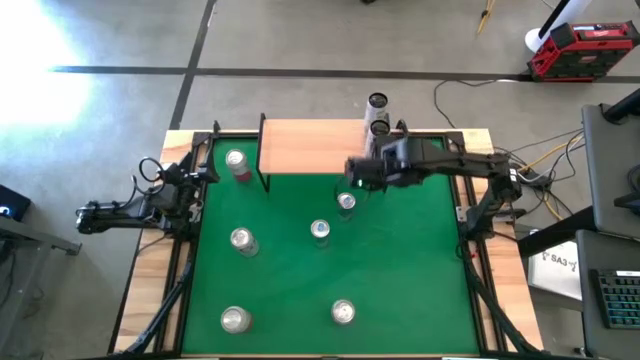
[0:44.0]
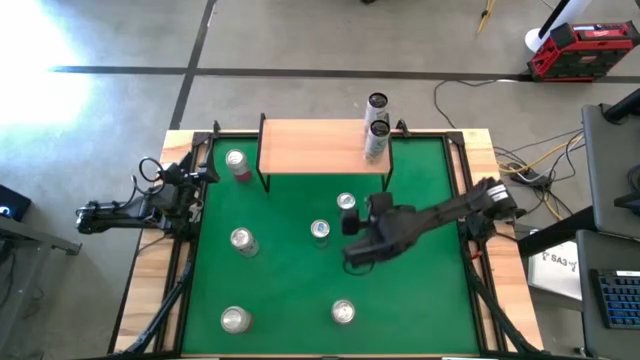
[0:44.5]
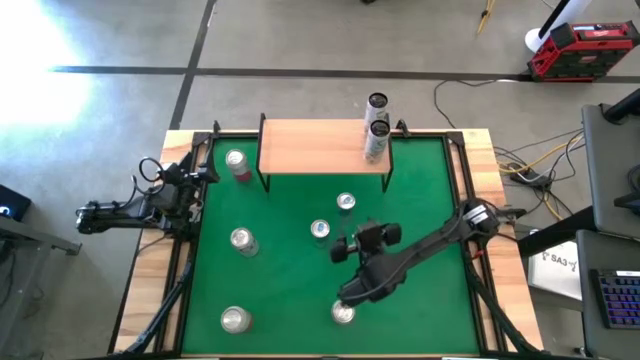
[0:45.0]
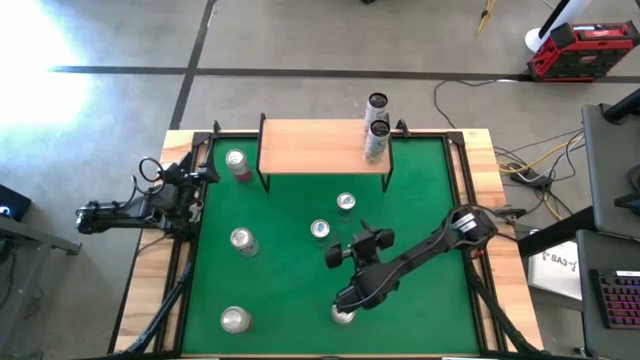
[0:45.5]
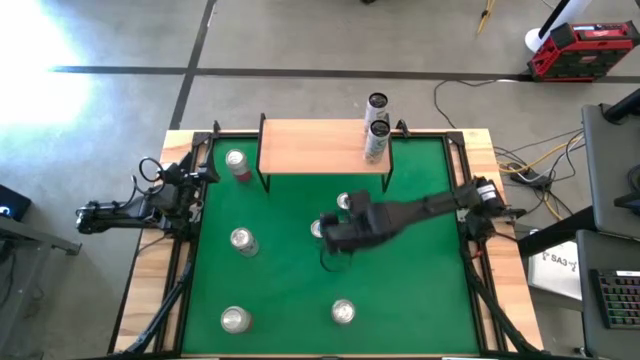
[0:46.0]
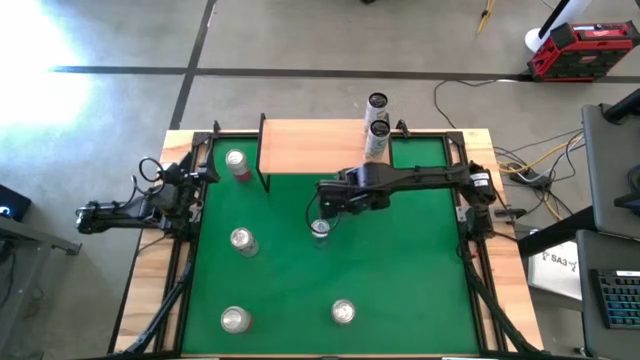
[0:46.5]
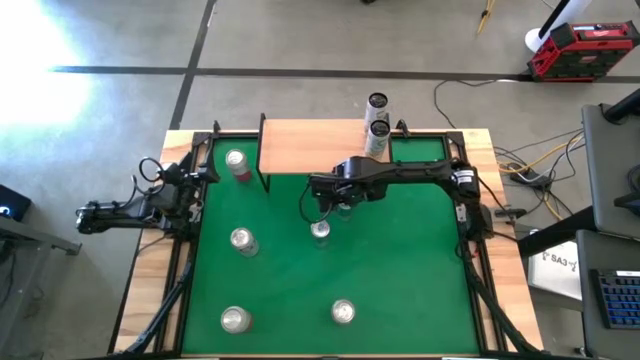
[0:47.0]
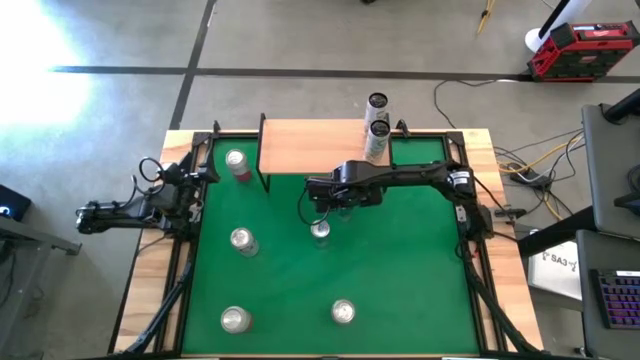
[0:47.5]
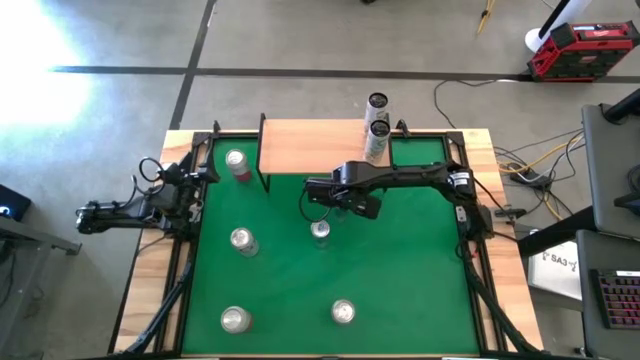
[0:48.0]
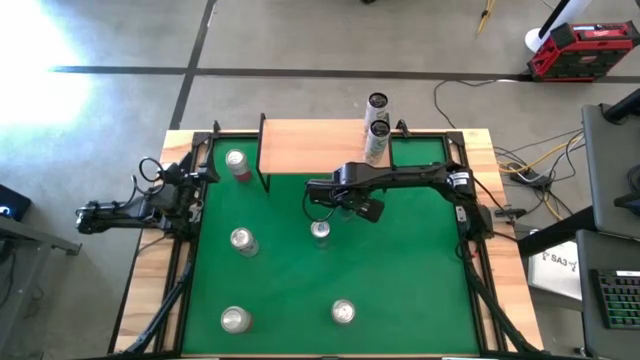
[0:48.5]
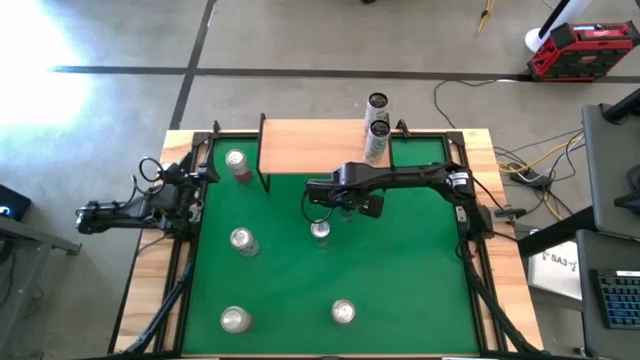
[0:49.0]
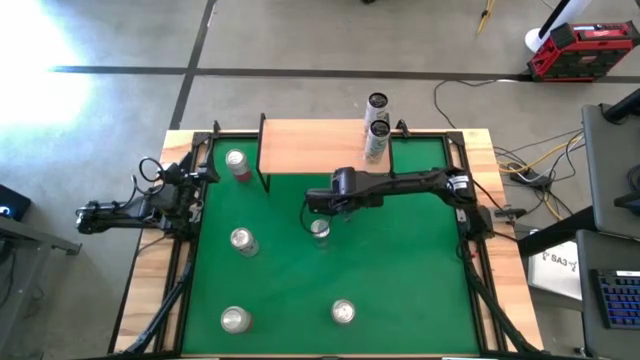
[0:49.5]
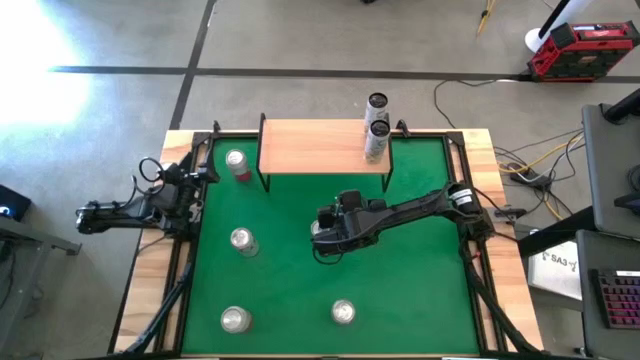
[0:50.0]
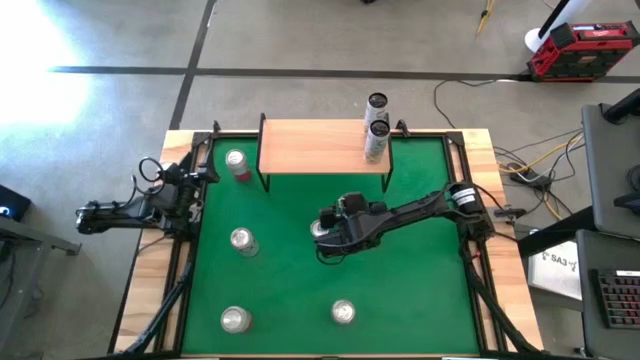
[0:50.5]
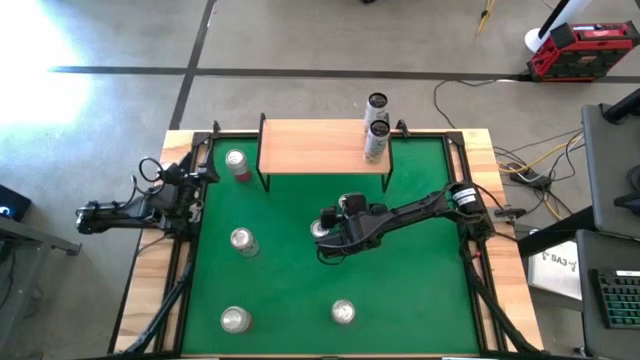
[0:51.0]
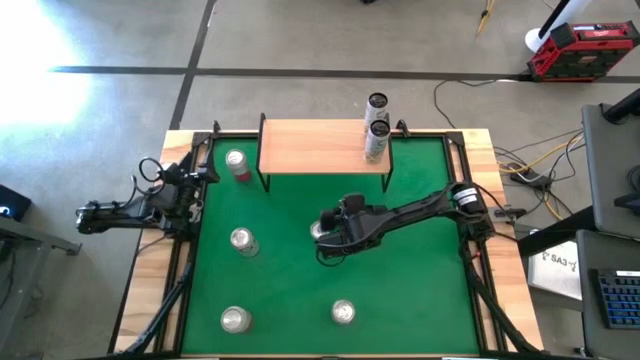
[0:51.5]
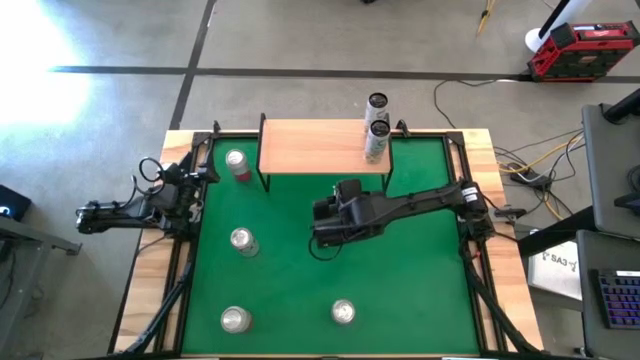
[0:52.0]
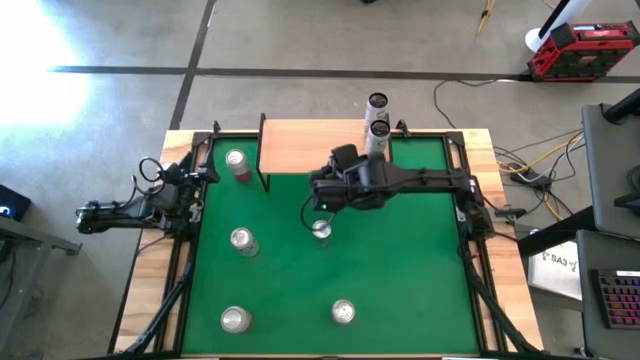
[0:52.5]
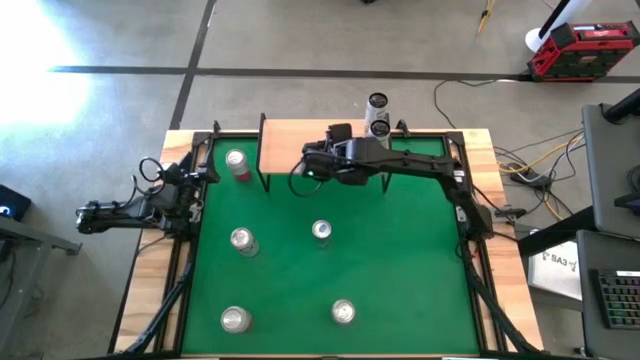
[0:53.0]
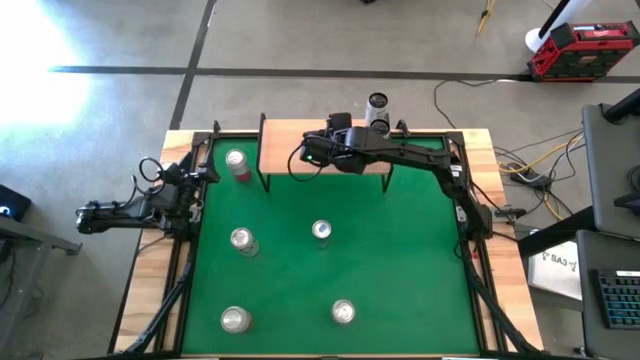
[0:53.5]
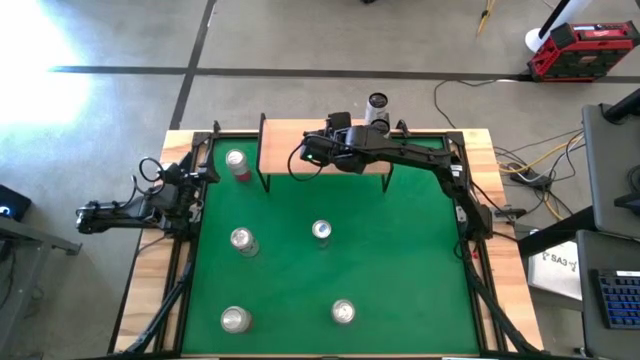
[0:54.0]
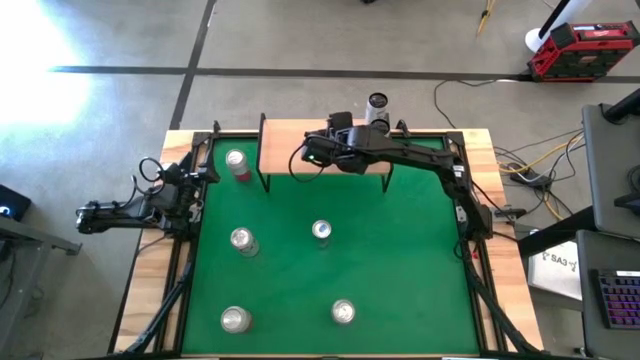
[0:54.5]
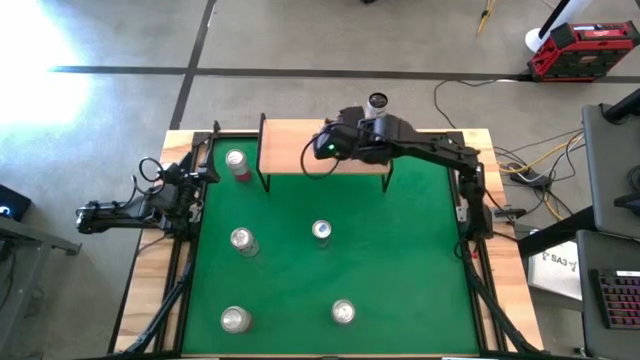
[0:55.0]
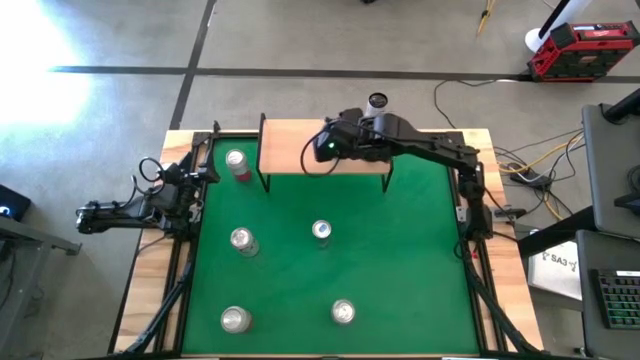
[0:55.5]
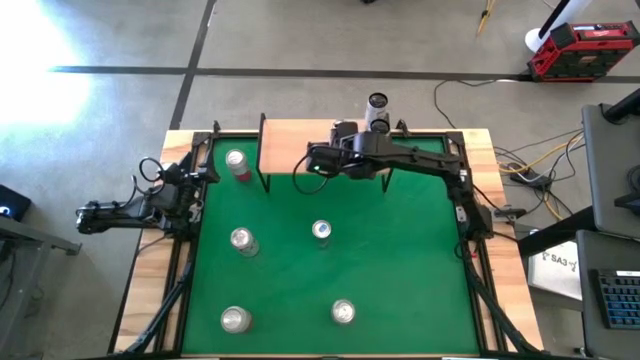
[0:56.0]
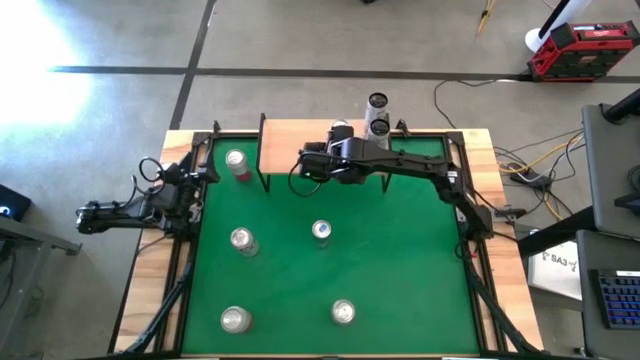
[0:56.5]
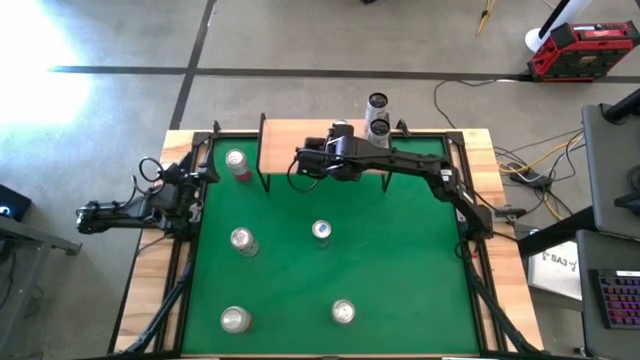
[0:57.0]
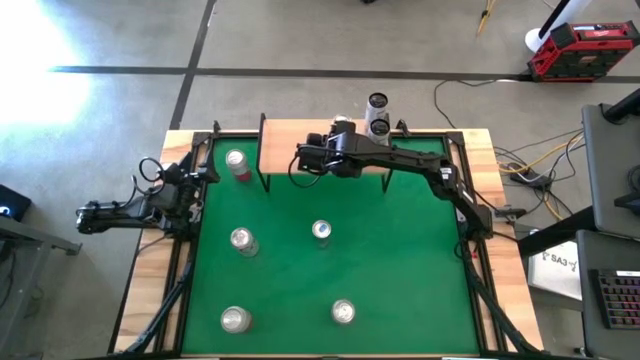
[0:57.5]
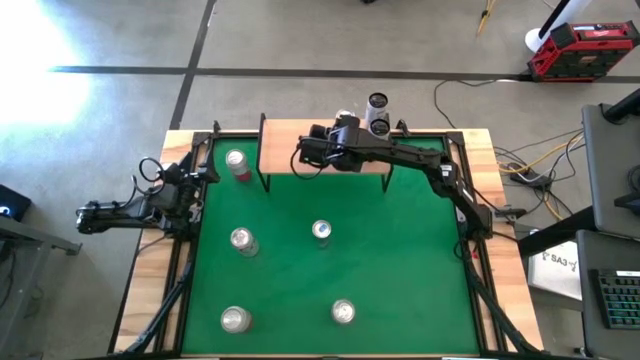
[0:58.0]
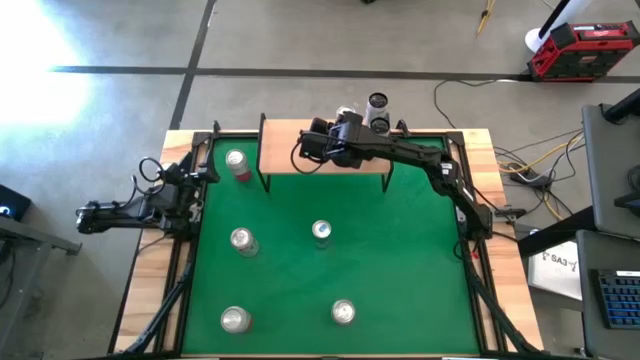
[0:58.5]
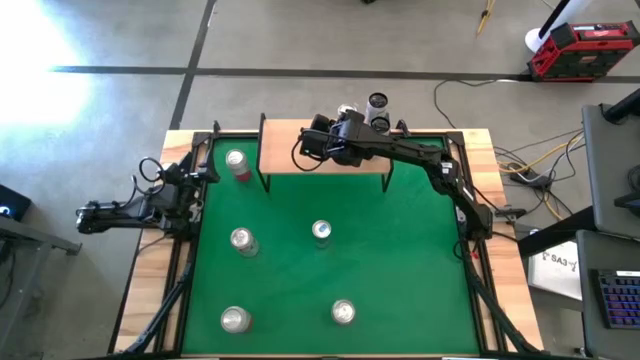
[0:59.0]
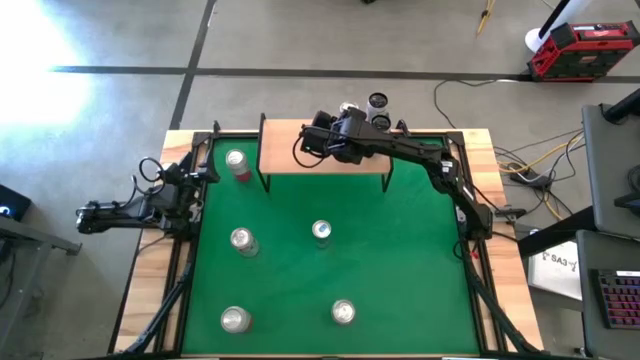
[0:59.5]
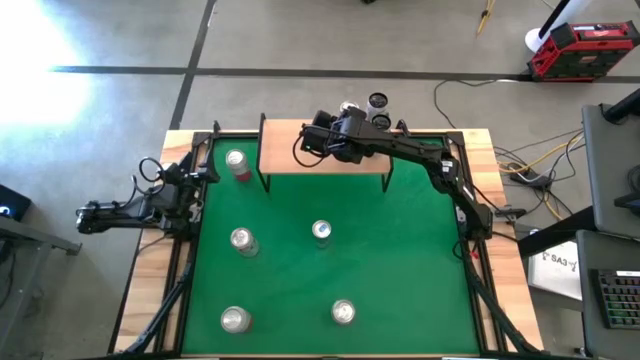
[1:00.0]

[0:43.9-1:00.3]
Task: Place canned beverage on shelf
Put the top blue soda can on the shelf

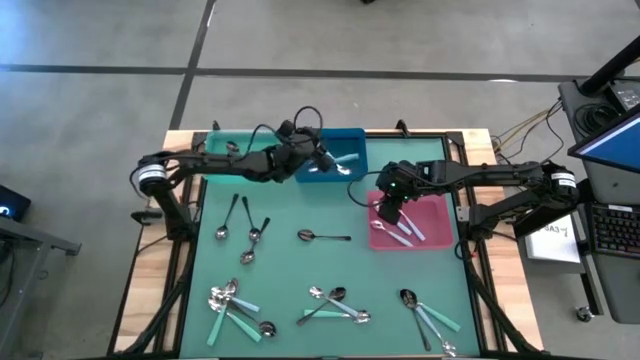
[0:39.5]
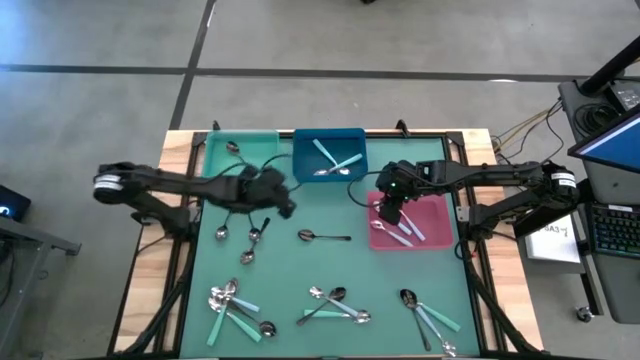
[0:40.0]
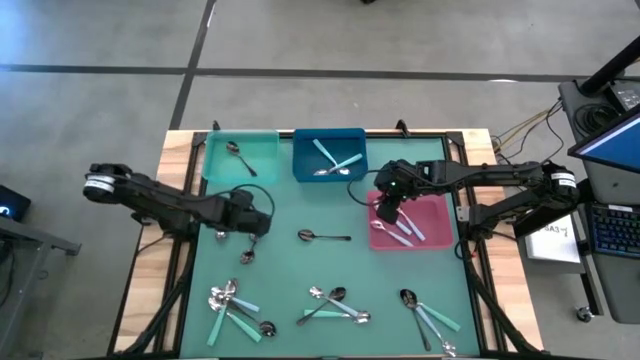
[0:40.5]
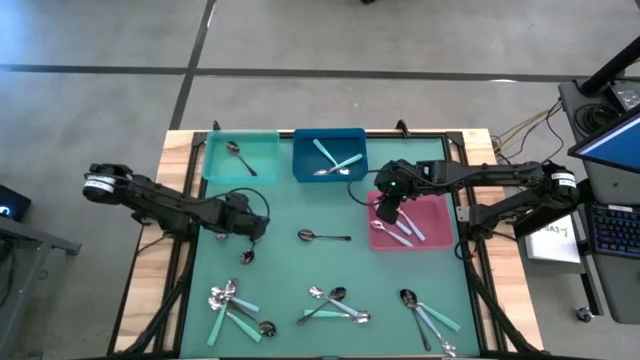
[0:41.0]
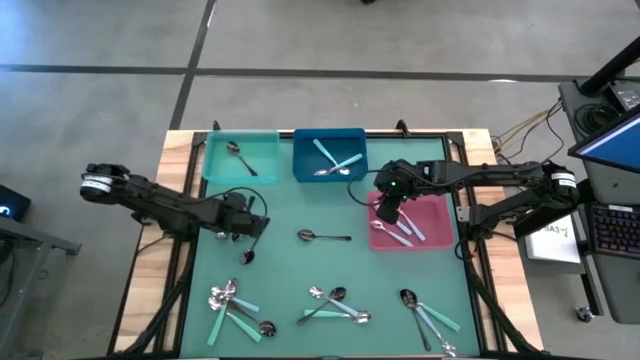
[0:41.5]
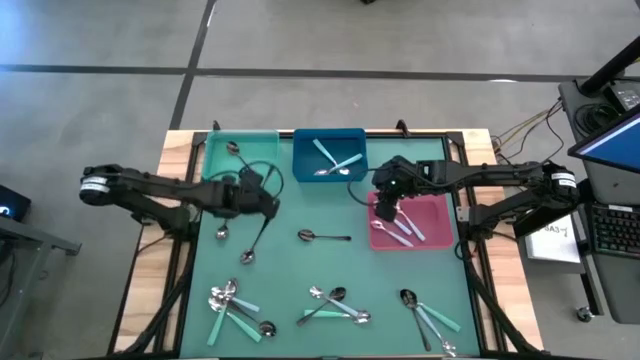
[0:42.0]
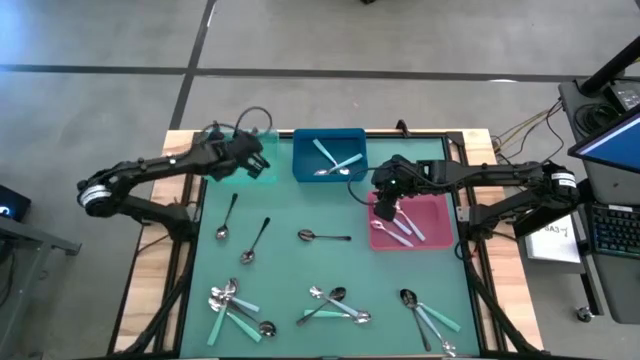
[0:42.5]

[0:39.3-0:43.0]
Task: Sort silverware by color (type)
Put the black spoon into the green bin

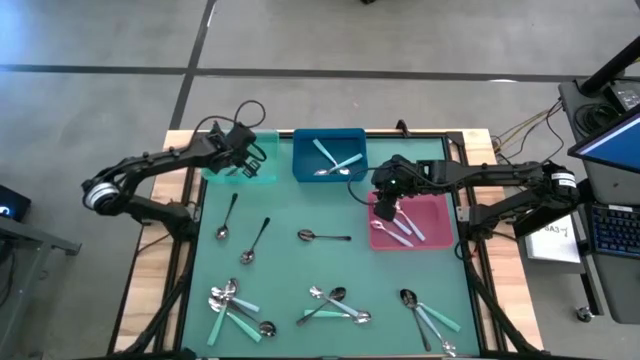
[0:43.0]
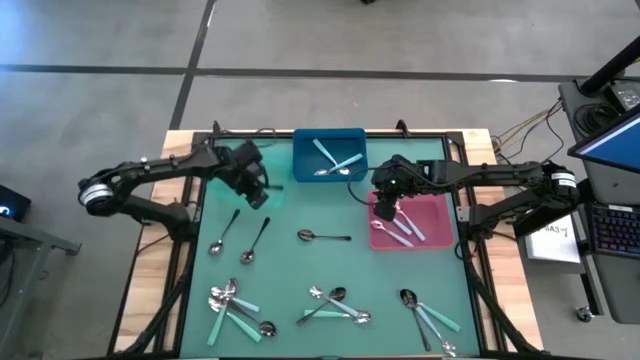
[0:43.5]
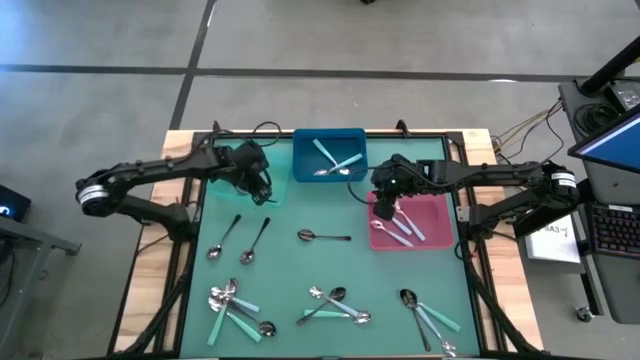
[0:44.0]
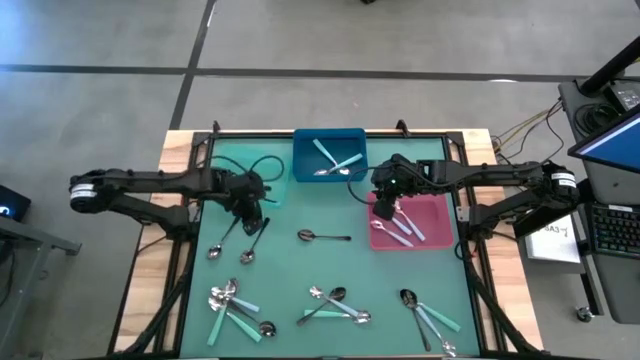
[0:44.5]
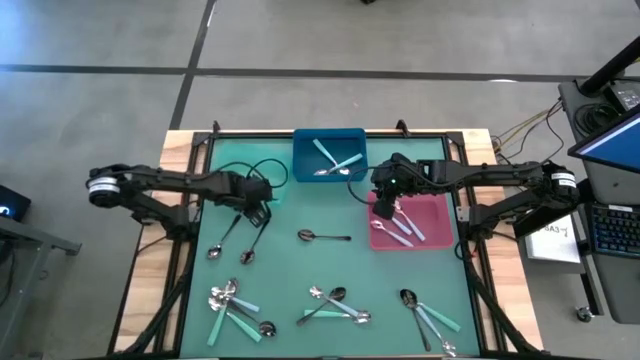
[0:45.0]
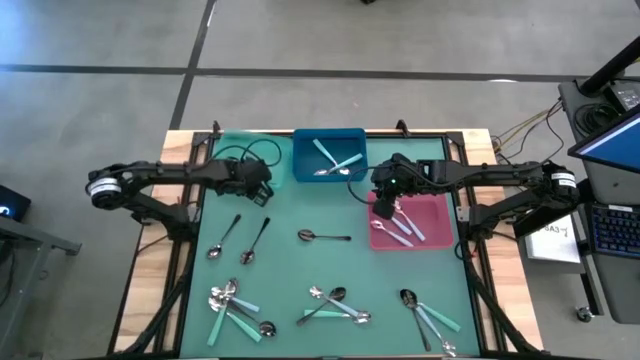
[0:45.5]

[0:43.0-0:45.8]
Adjust the green bin
